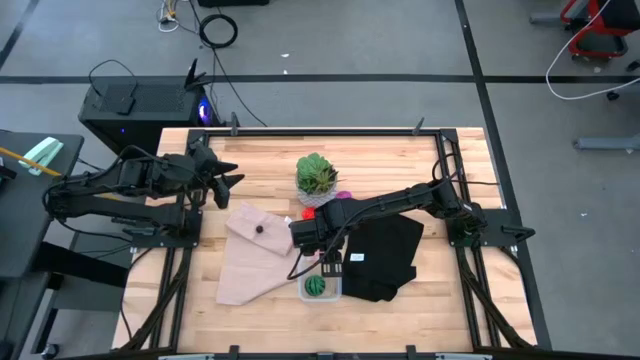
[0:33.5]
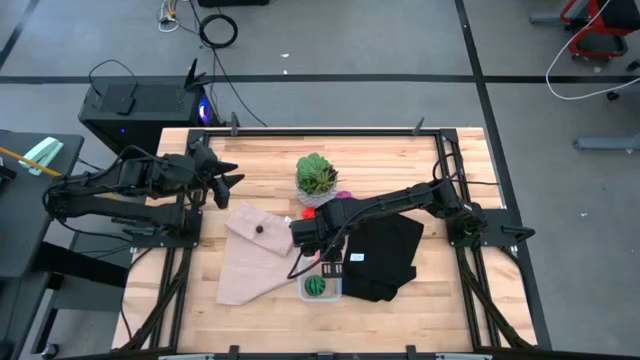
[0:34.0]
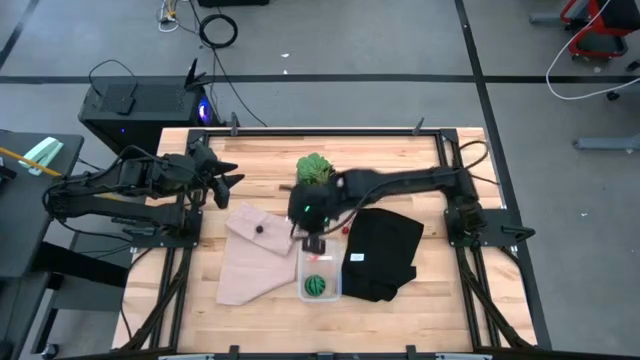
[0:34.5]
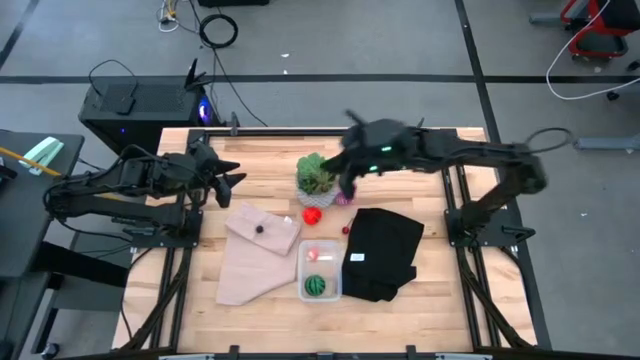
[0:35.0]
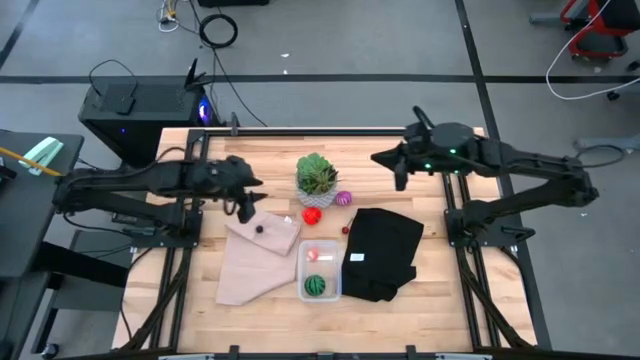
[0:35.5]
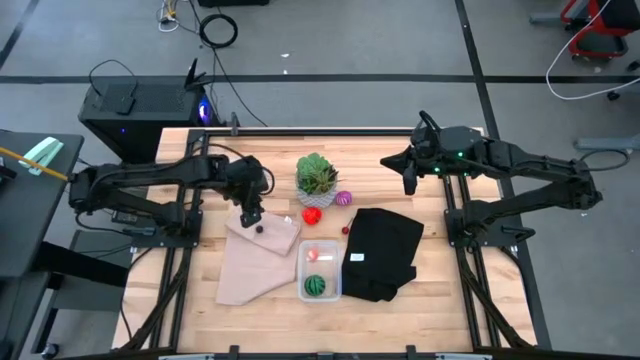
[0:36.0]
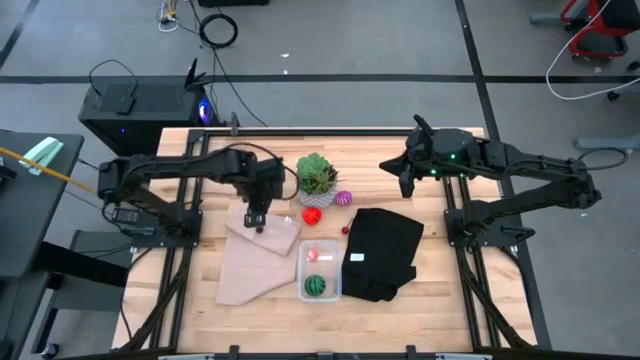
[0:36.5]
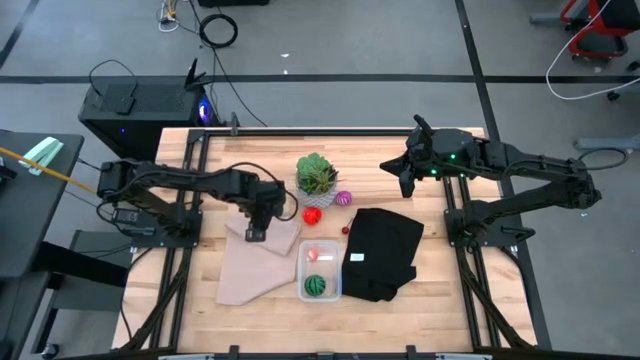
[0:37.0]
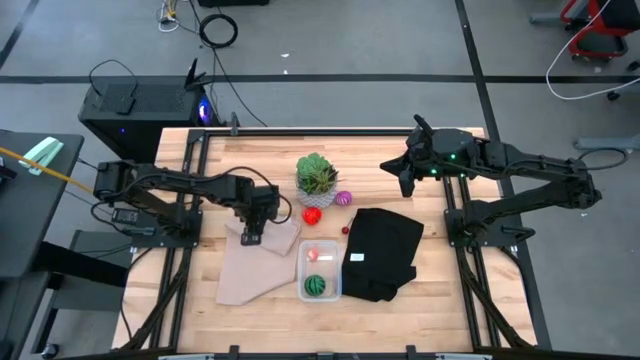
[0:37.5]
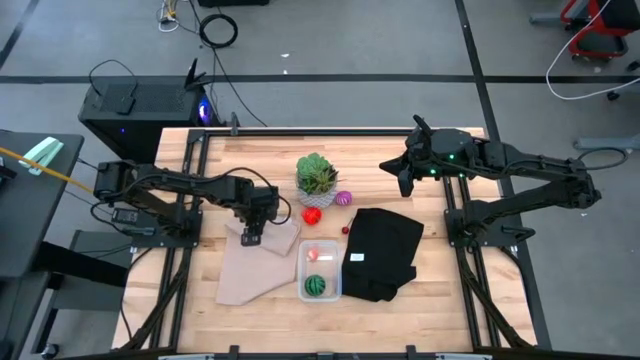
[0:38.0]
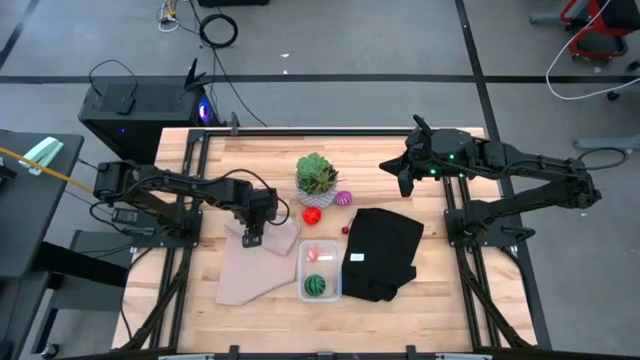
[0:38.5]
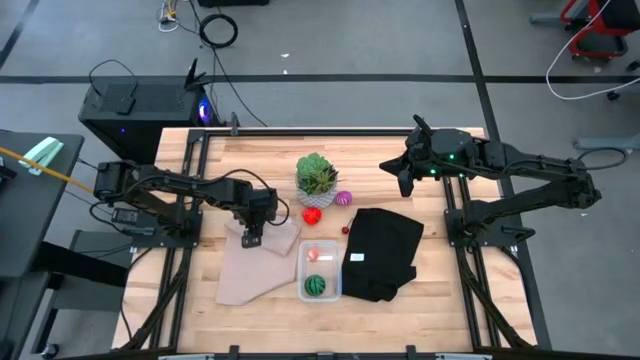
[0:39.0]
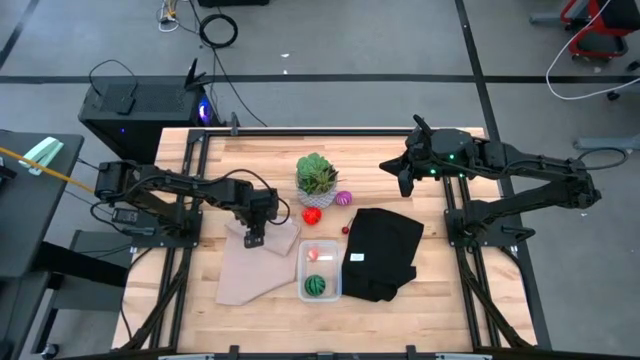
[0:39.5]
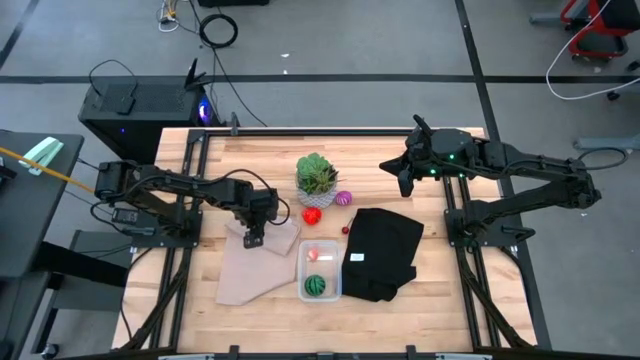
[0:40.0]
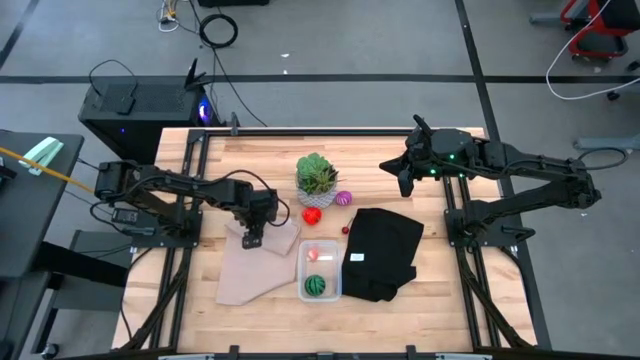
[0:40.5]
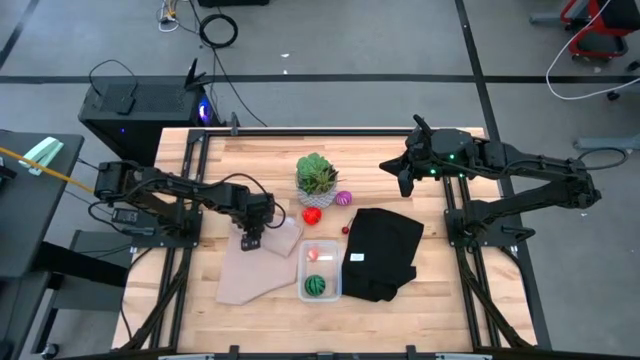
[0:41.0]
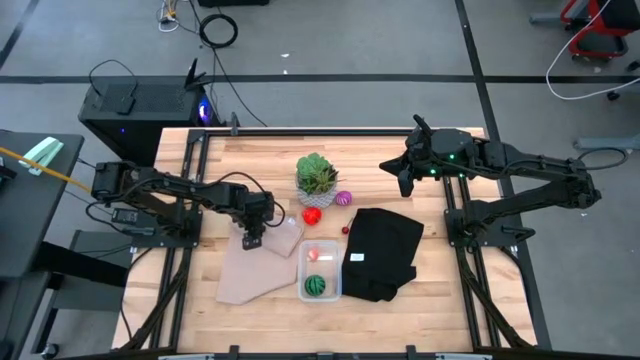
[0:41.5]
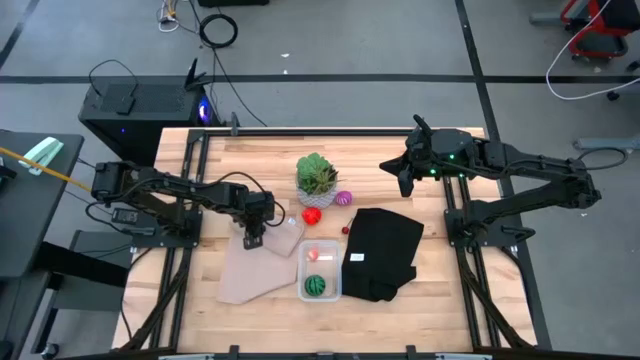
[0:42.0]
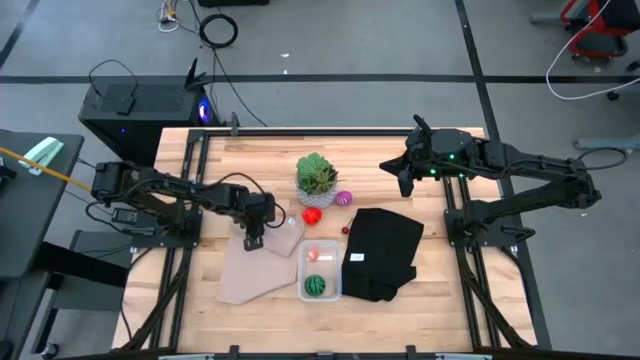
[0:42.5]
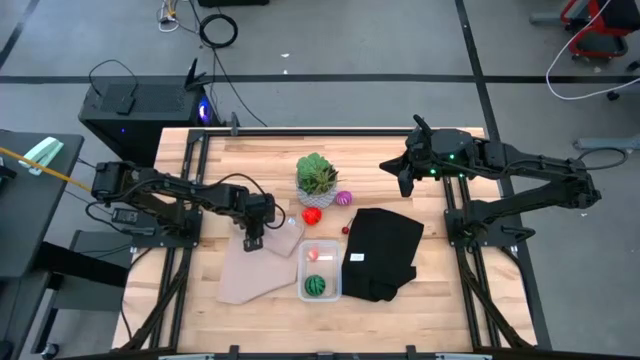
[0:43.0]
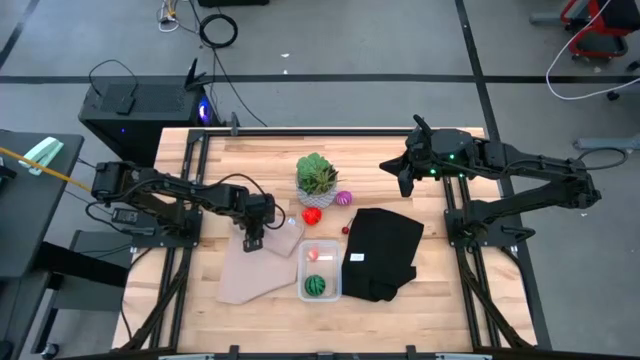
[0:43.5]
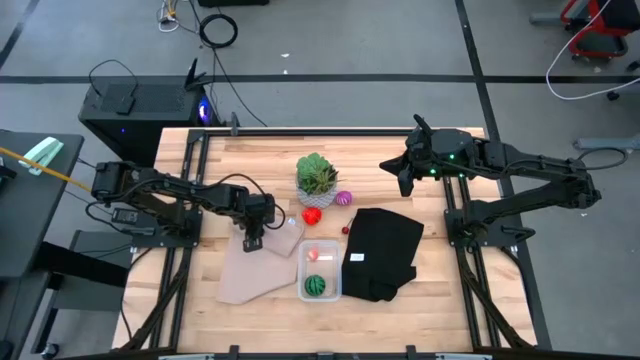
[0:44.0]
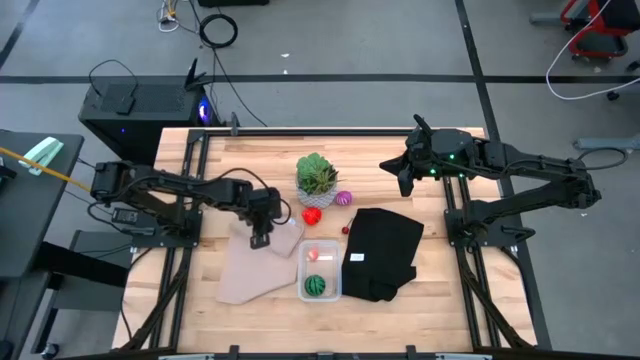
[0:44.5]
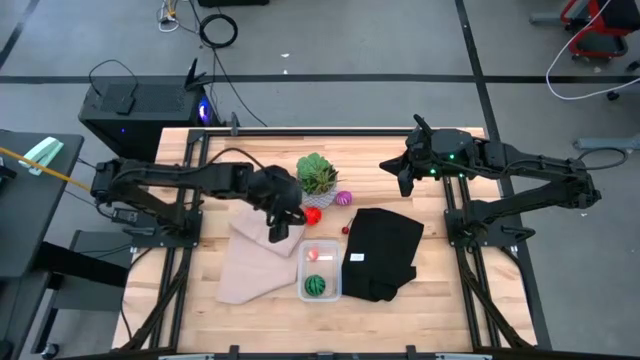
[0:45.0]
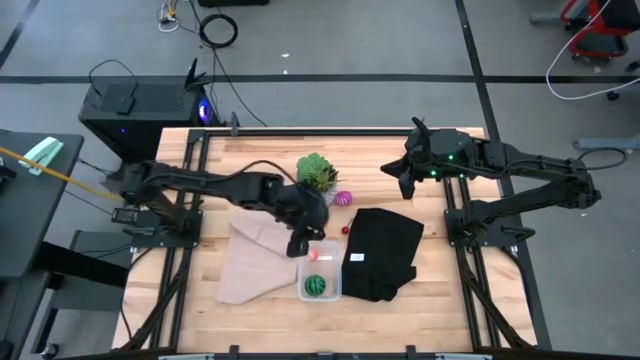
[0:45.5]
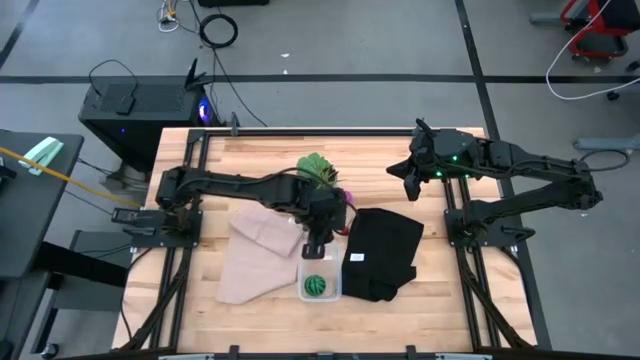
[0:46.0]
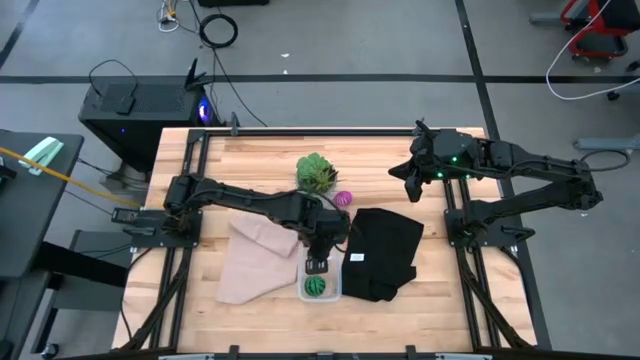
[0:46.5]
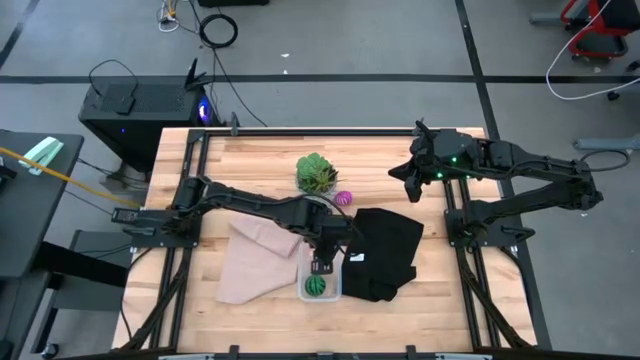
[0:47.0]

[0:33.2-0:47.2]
Task: Pick and placing Produce into tupperware
Put the blueberry into the transparent container

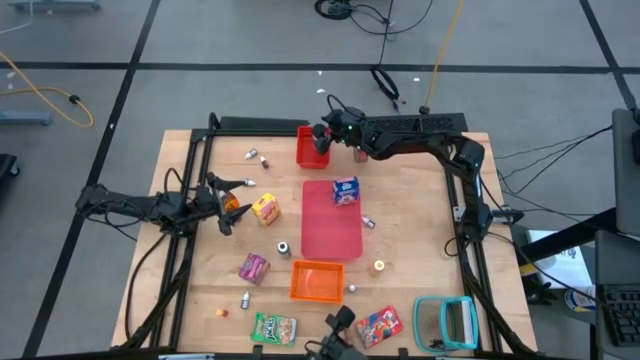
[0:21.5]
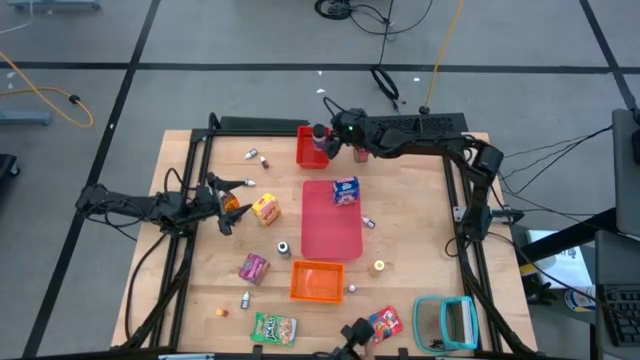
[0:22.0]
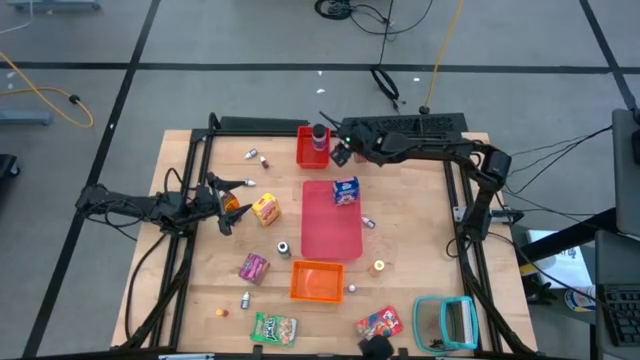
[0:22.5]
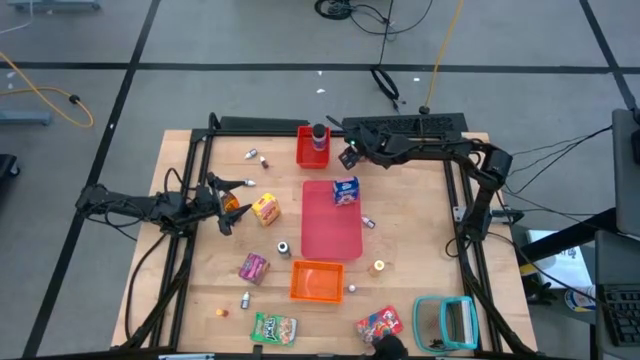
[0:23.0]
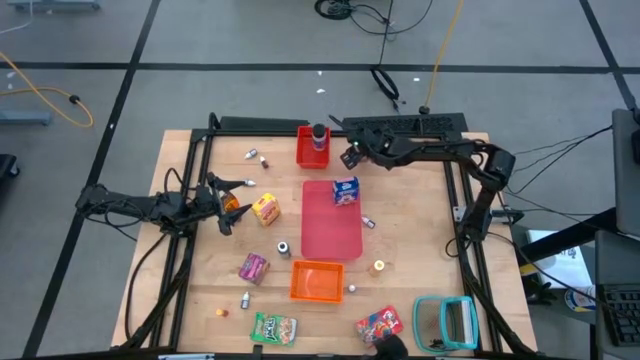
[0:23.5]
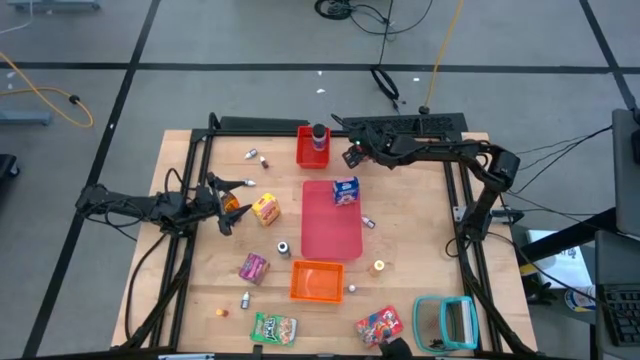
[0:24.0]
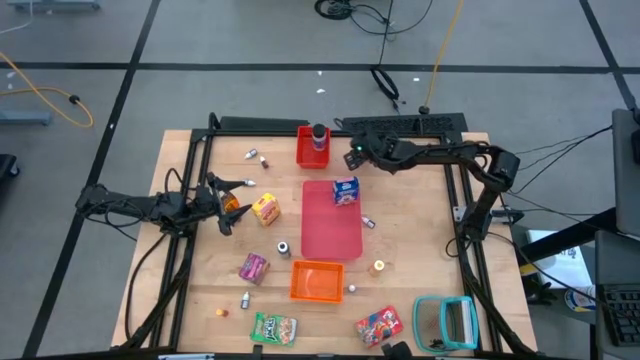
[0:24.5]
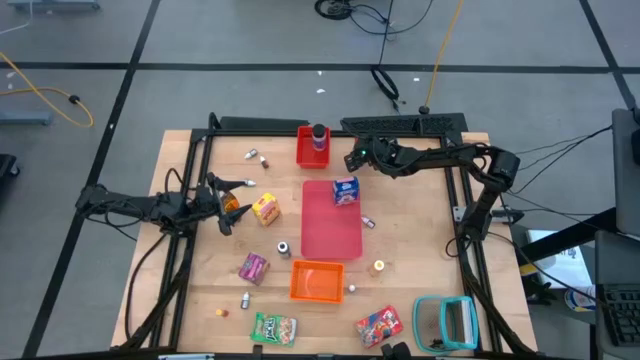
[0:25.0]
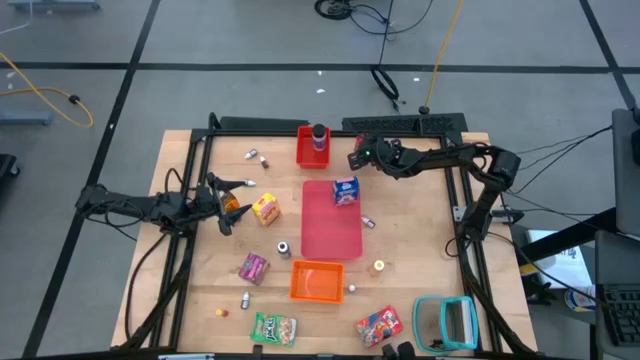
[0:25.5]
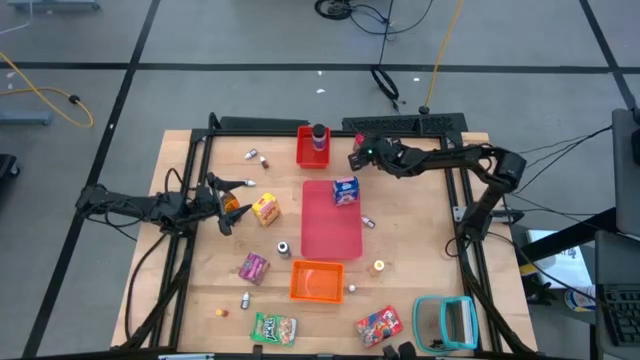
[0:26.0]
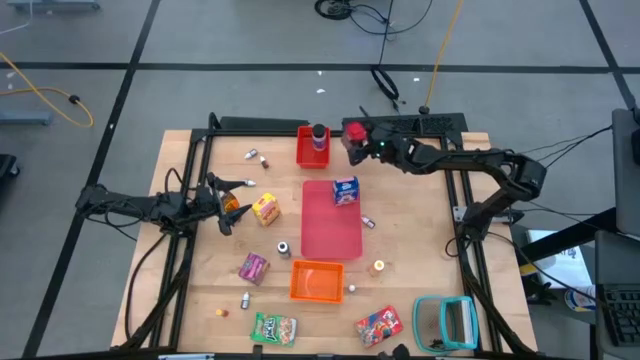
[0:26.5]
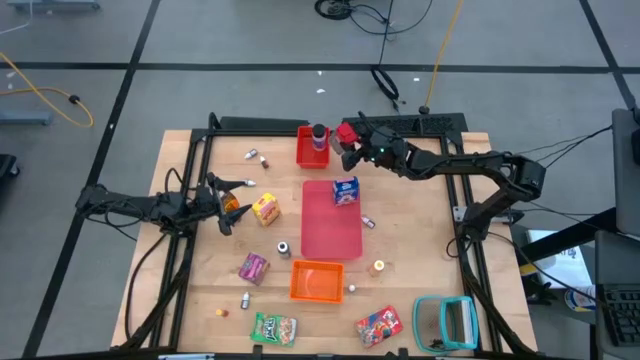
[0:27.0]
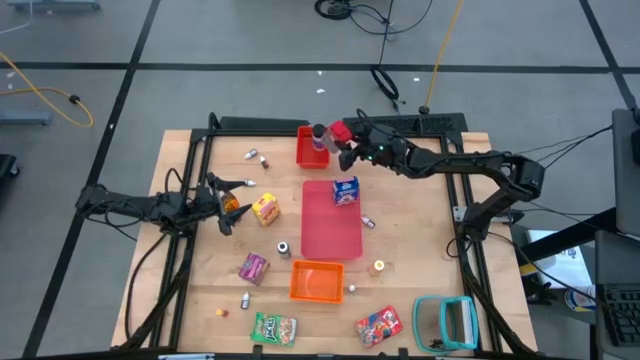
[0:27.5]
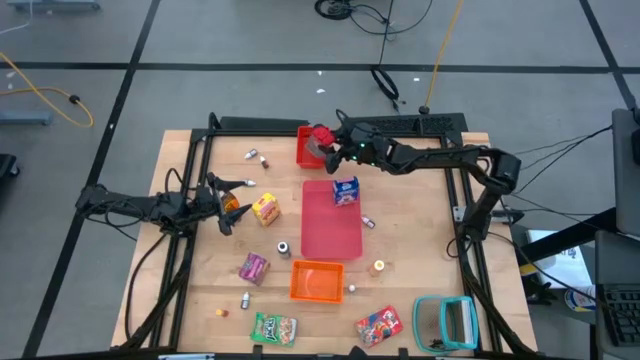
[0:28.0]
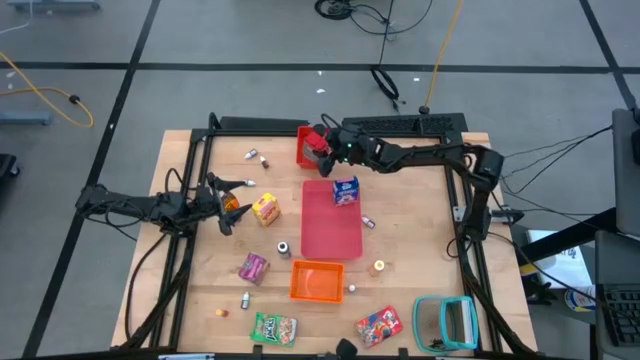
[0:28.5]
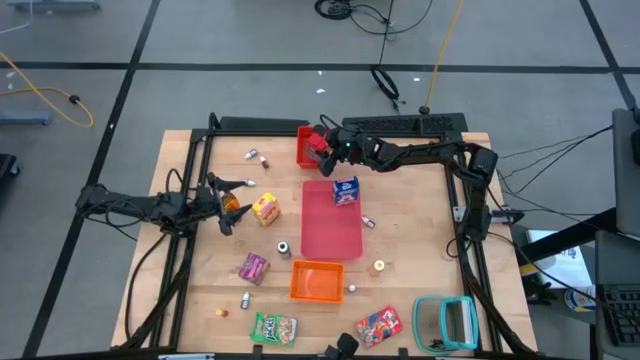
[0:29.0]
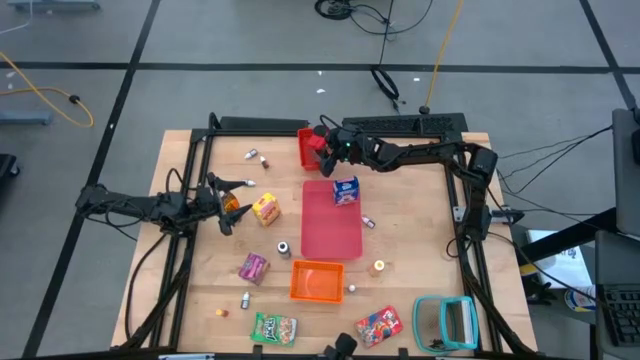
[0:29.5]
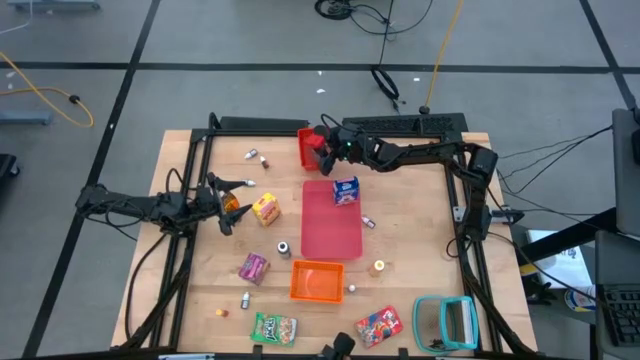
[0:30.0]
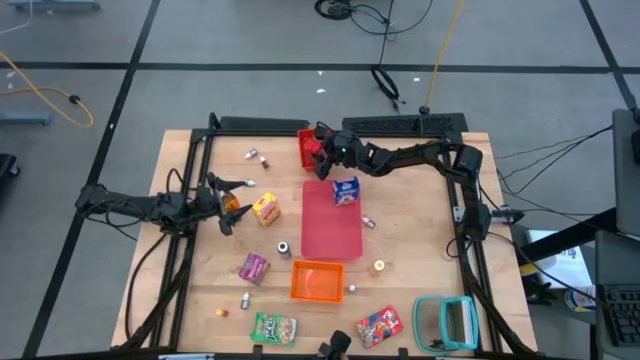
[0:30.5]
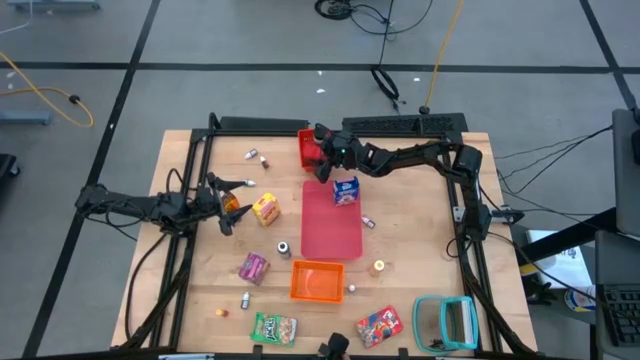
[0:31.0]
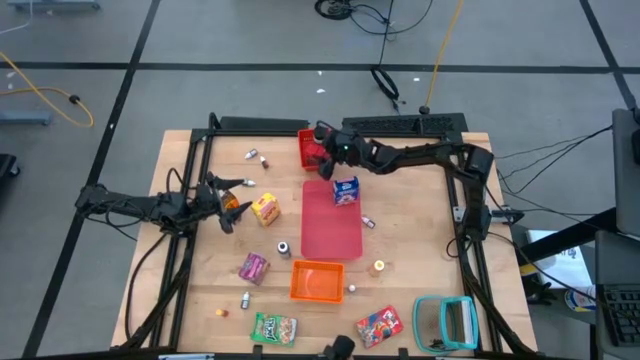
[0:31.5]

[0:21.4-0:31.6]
Task: Pick & Place Kitchen Items
Put the red seasoning can into the red bin
